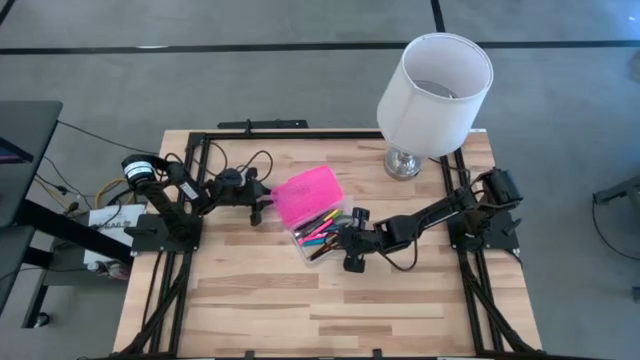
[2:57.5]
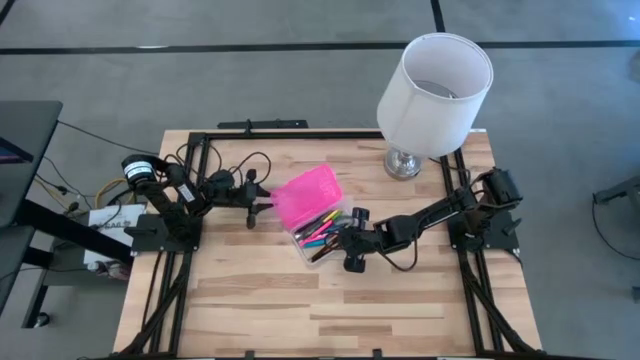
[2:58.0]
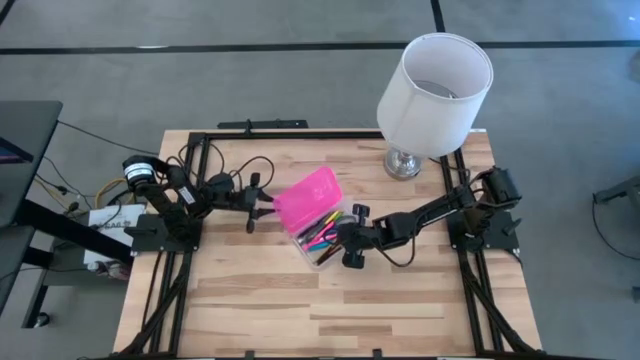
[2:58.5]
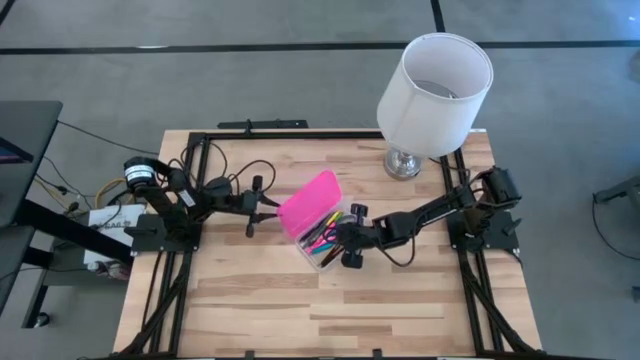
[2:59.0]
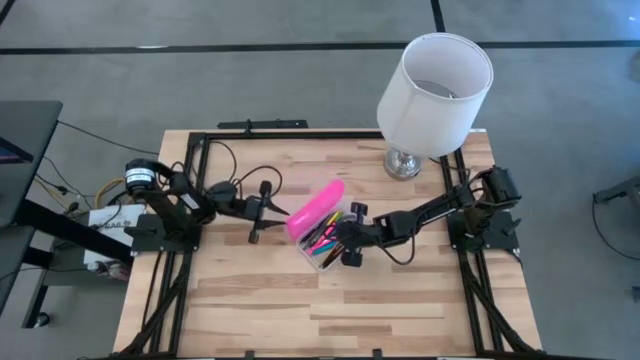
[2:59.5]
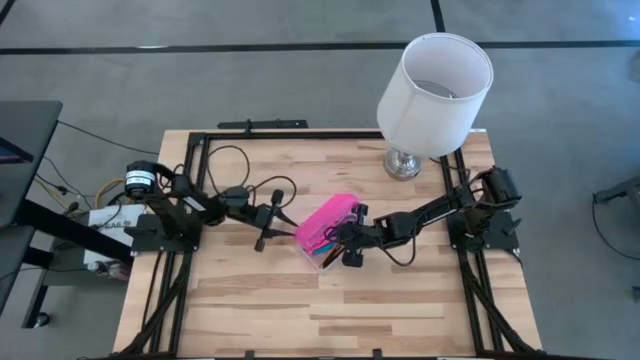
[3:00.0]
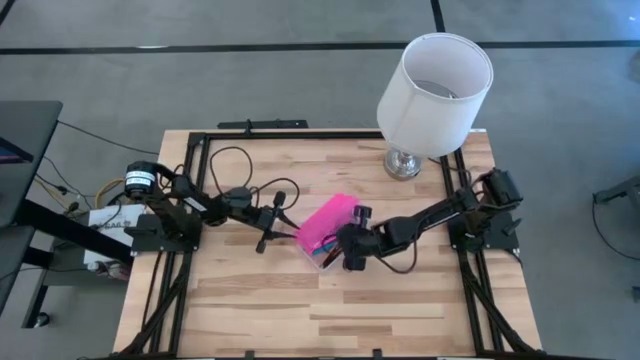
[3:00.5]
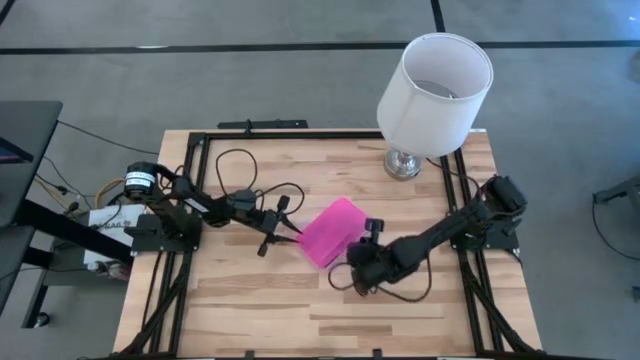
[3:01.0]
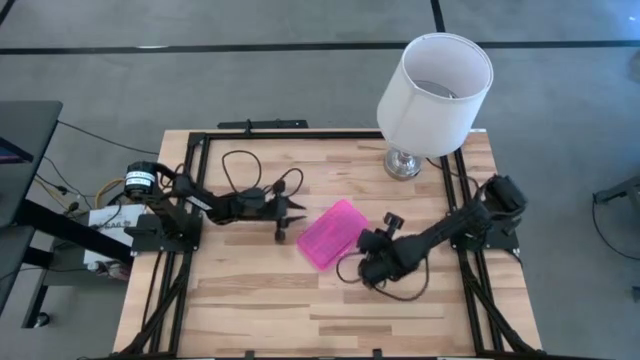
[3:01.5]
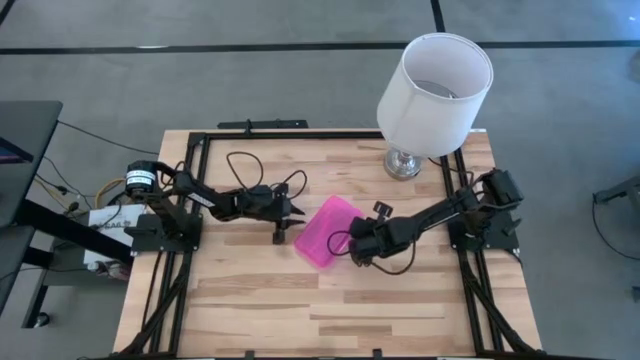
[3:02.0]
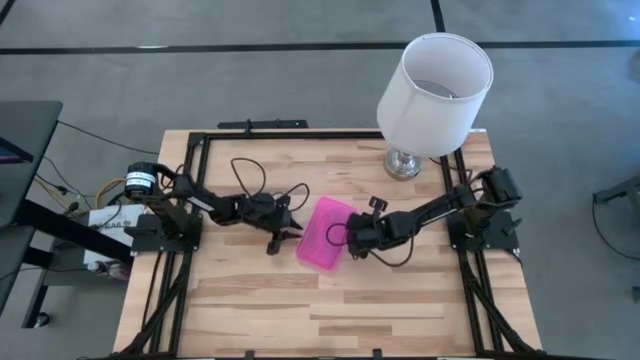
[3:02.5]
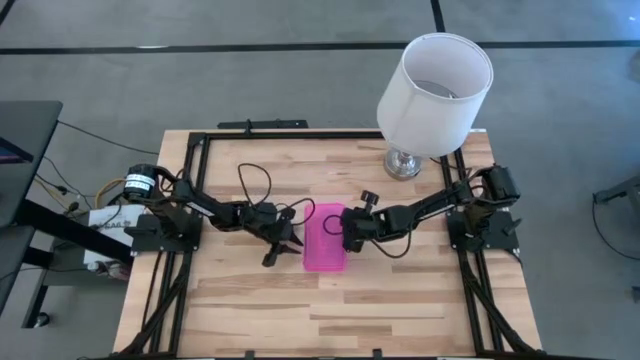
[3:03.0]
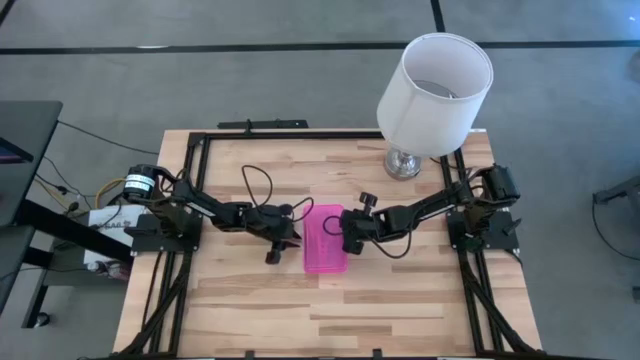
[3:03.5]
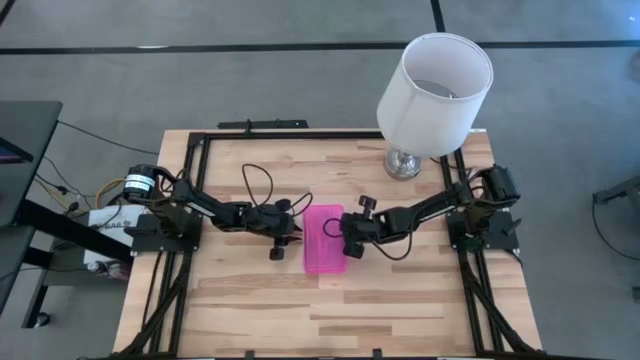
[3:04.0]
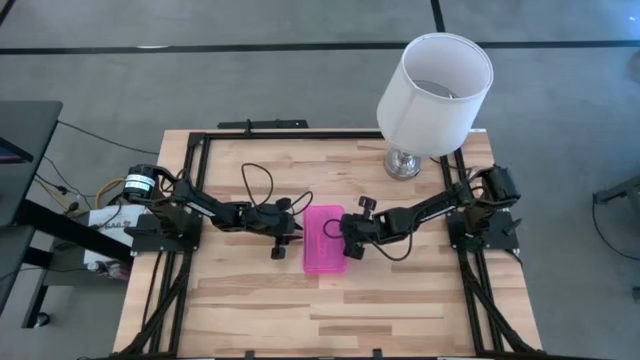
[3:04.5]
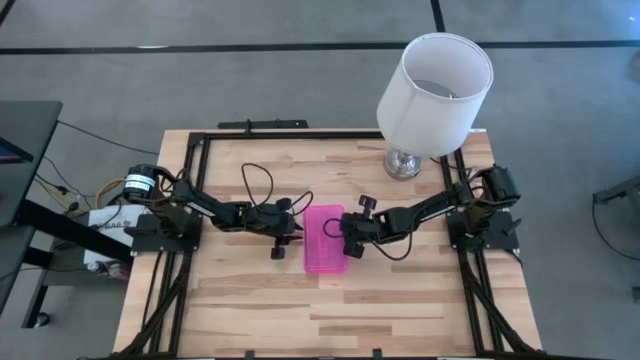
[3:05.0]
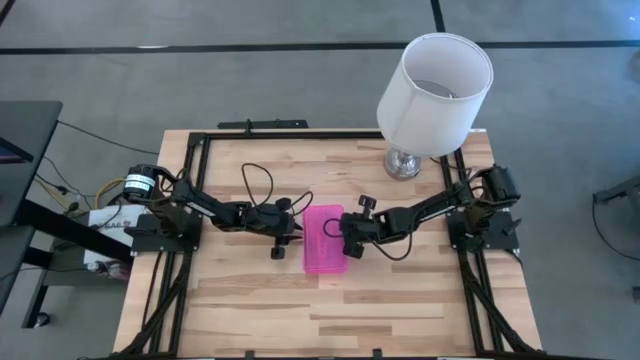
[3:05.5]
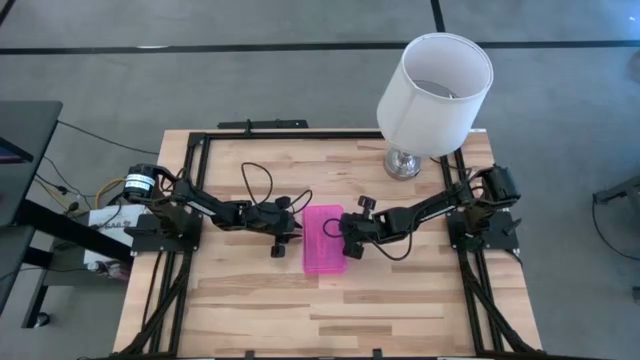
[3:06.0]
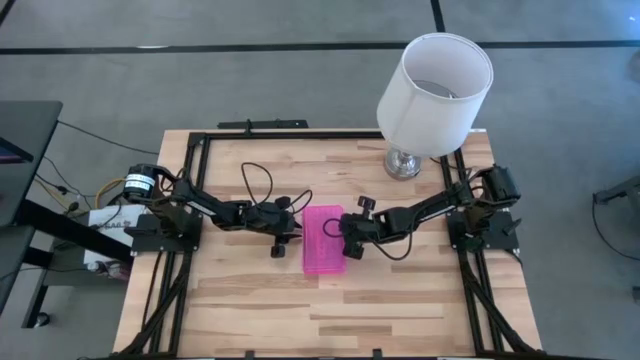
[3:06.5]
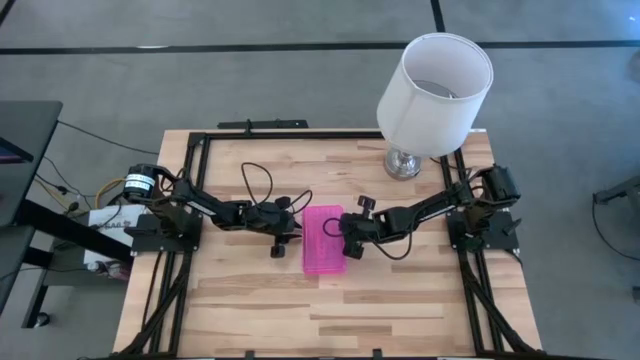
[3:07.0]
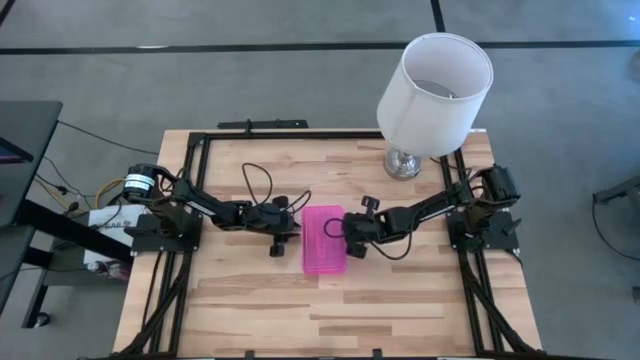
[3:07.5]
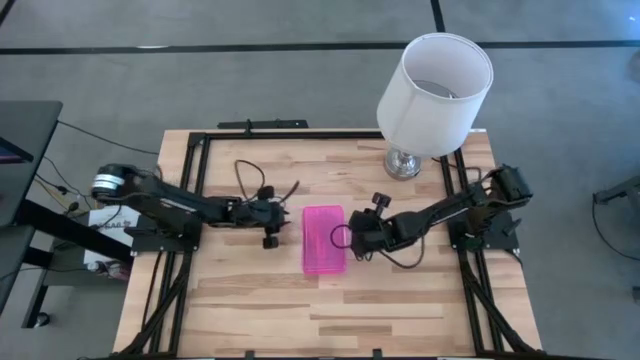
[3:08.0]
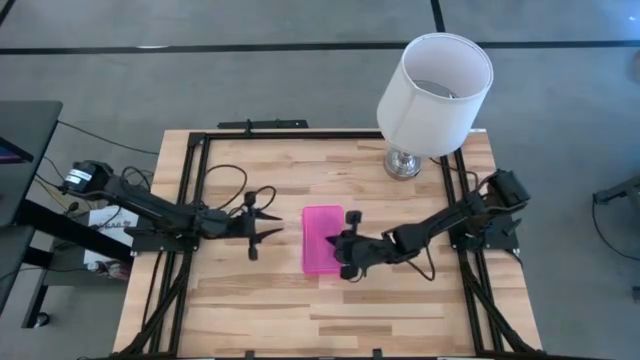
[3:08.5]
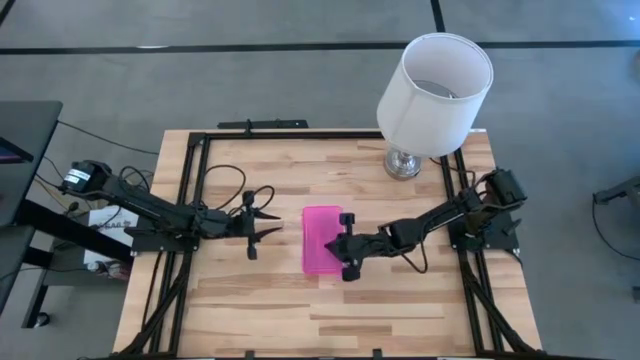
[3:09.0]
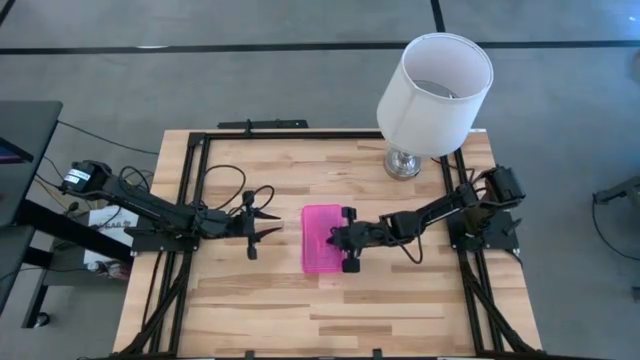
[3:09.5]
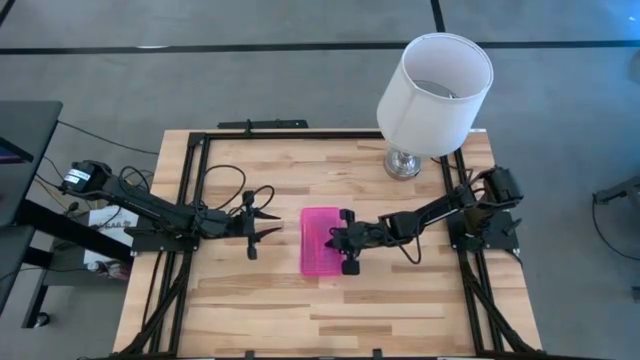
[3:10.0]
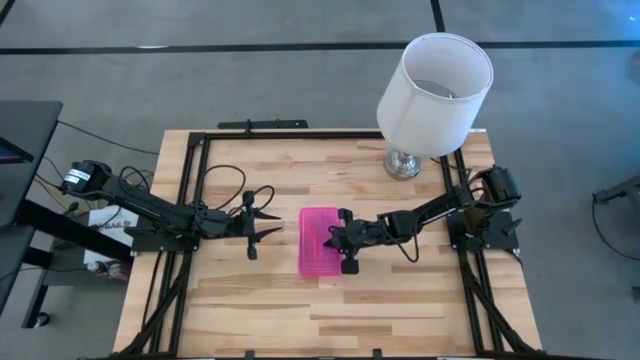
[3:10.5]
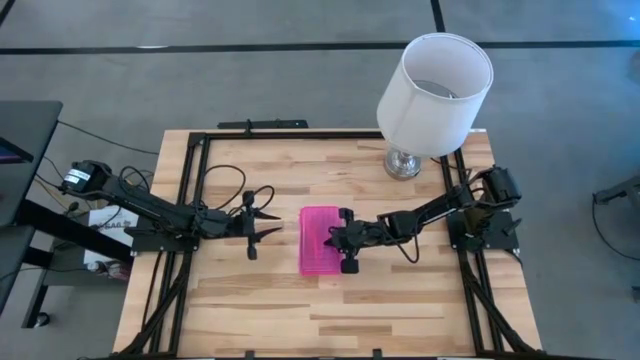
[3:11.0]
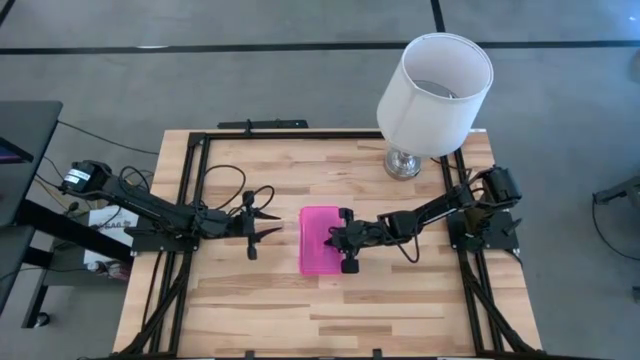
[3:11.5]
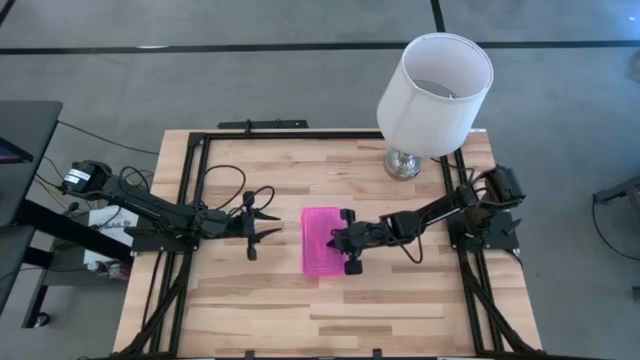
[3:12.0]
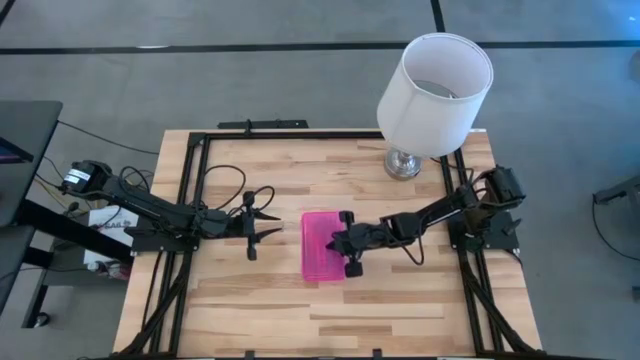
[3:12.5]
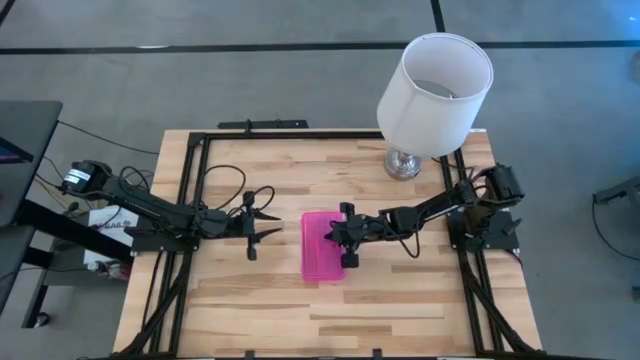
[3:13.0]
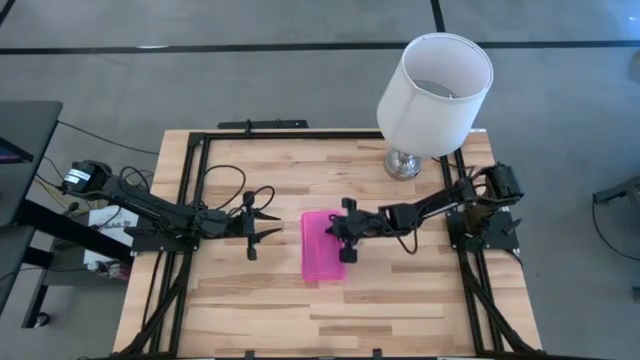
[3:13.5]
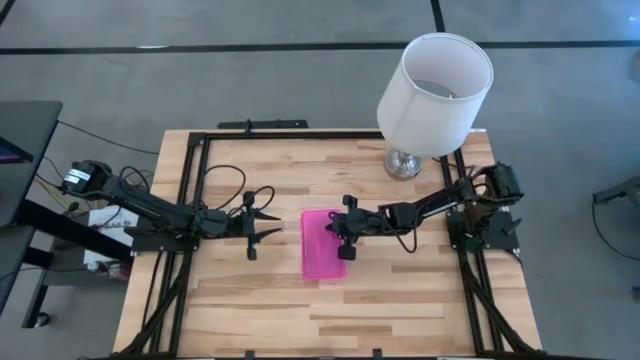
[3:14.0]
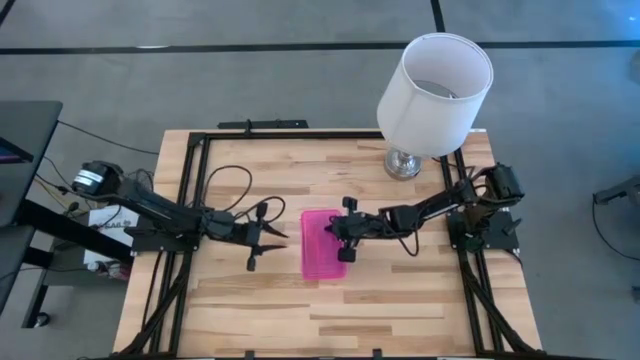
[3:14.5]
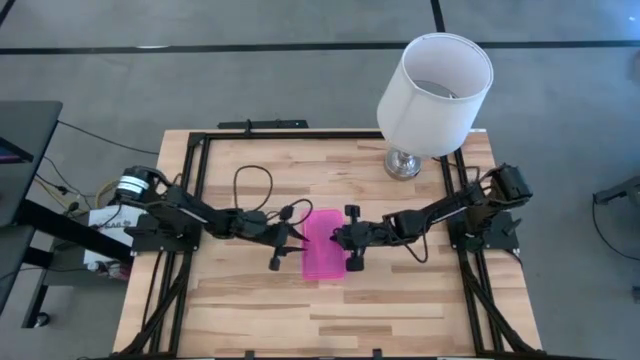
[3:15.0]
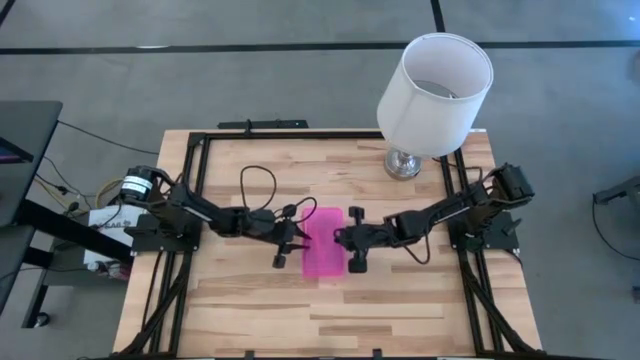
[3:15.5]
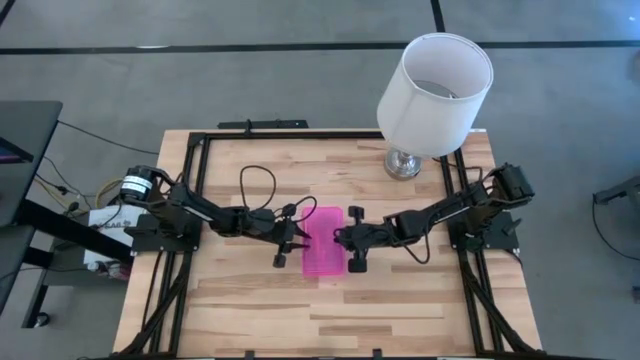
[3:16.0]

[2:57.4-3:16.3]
Task: Pick & place school supplies into a supply box
Close the pink supply box

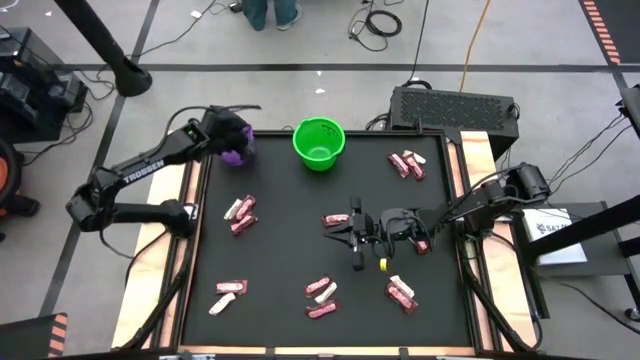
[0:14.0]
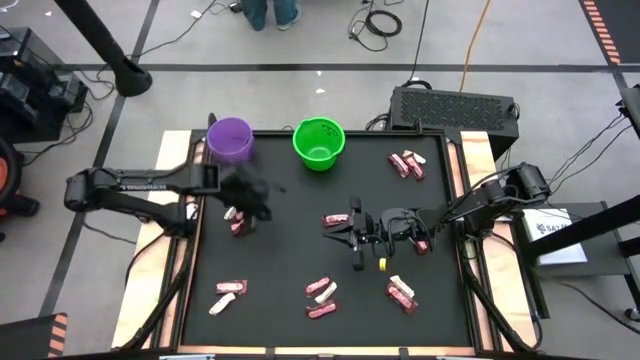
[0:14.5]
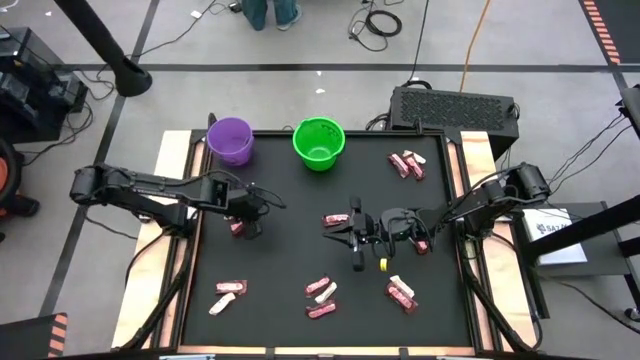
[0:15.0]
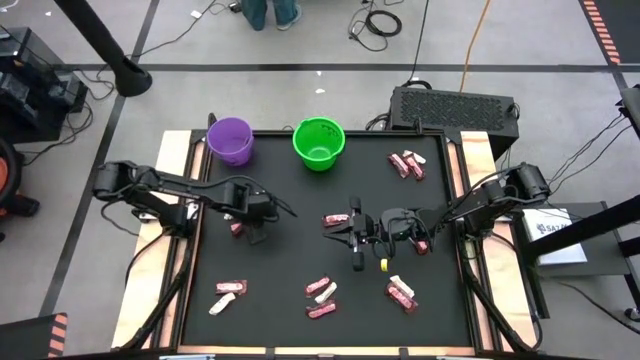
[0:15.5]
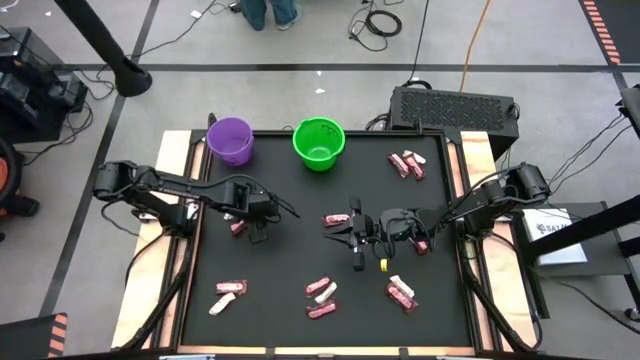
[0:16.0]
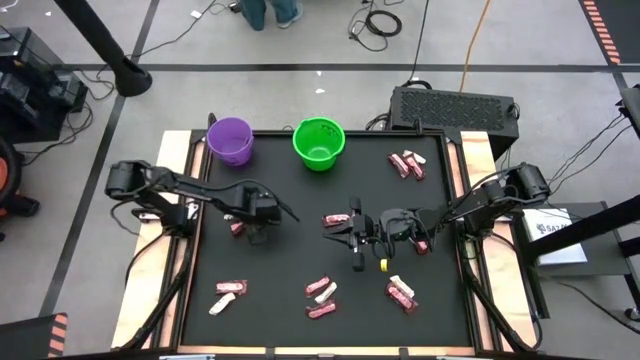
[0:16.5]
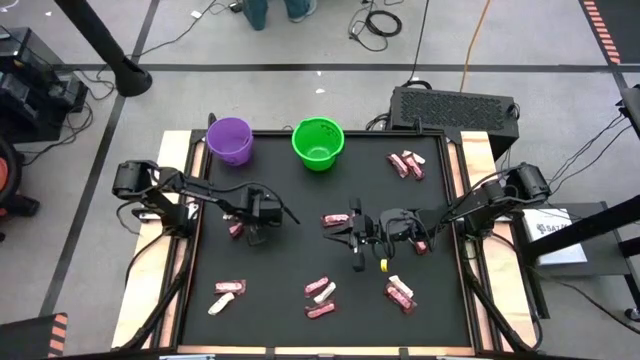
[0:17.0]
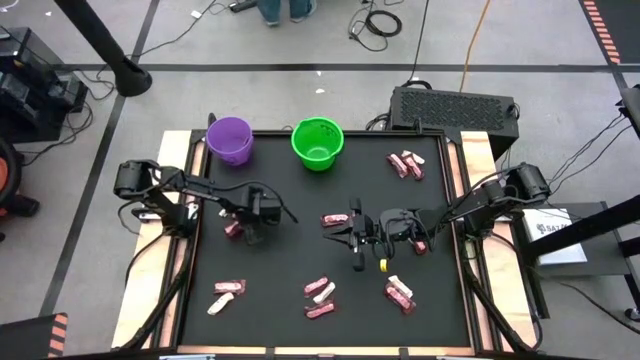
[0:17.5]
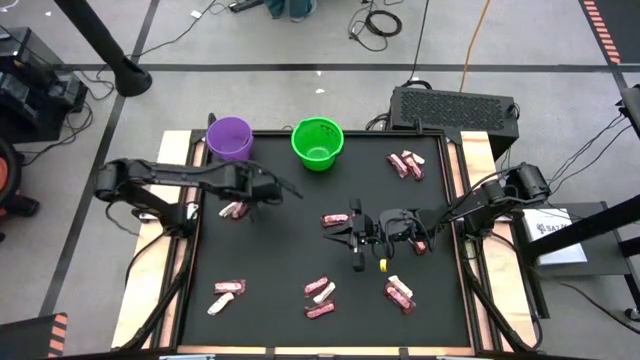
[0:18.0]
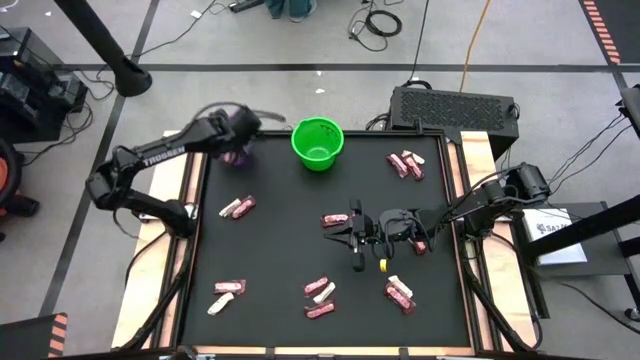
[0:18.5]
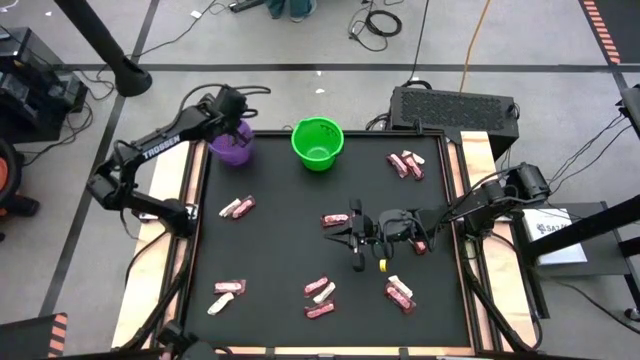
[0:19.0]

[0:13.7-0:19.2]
Task: Sort candy by brand, put in halloween buckets
Put the brown chocolate bar into the purple bucket
